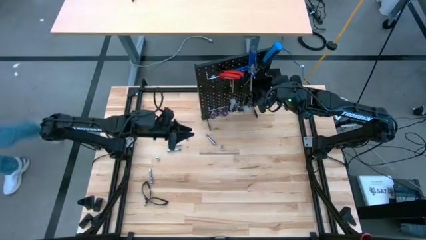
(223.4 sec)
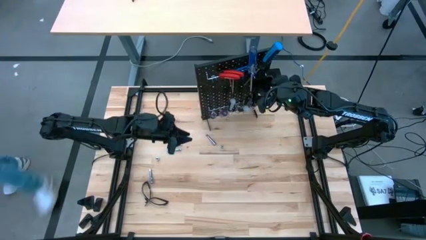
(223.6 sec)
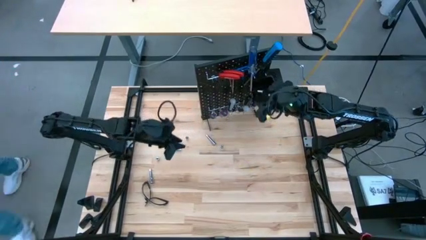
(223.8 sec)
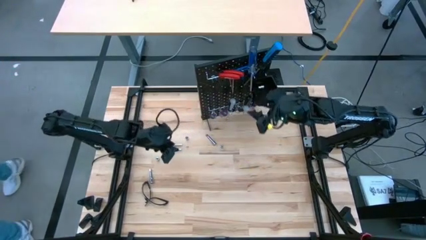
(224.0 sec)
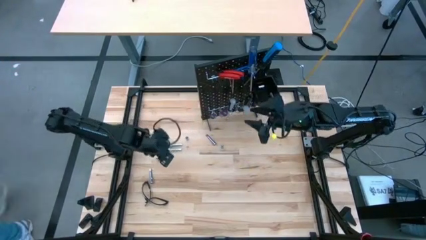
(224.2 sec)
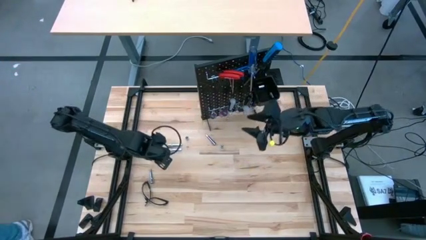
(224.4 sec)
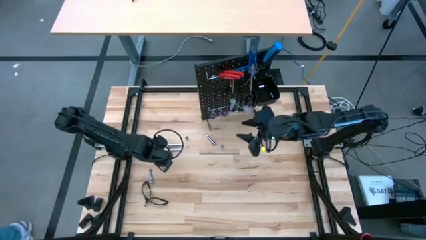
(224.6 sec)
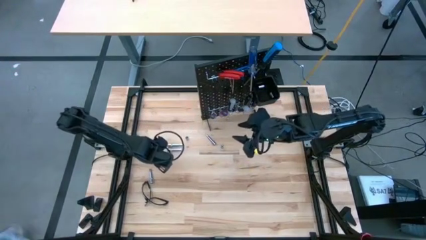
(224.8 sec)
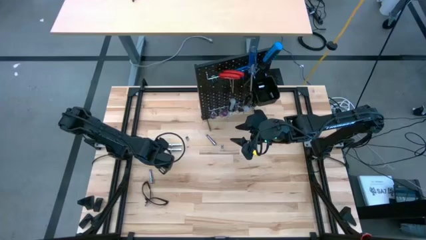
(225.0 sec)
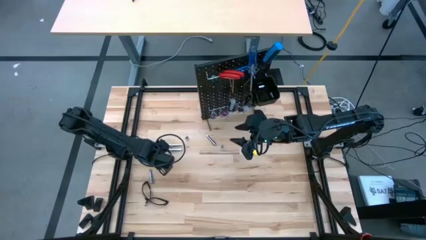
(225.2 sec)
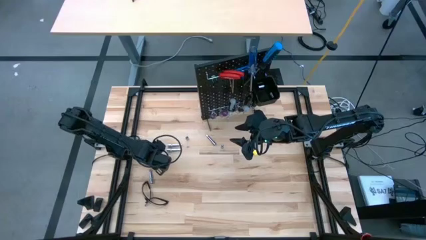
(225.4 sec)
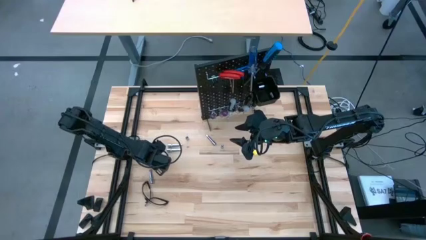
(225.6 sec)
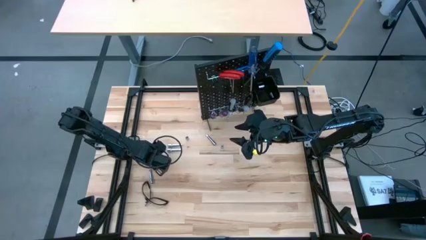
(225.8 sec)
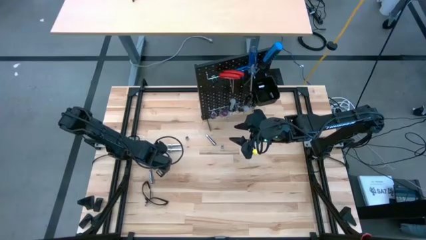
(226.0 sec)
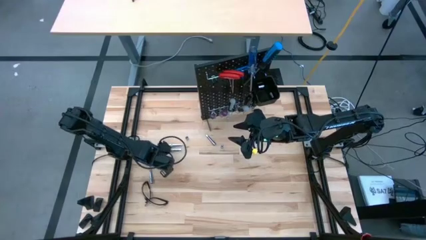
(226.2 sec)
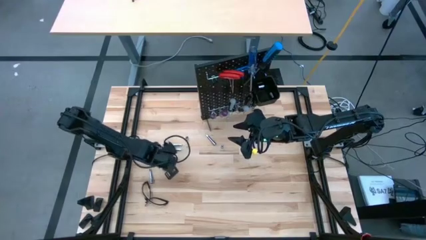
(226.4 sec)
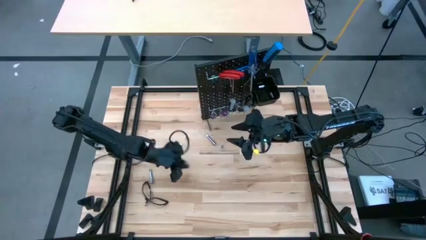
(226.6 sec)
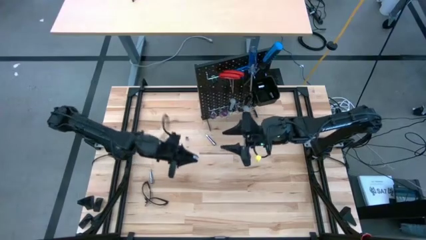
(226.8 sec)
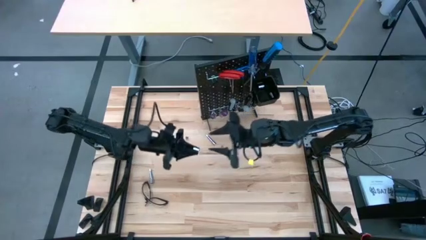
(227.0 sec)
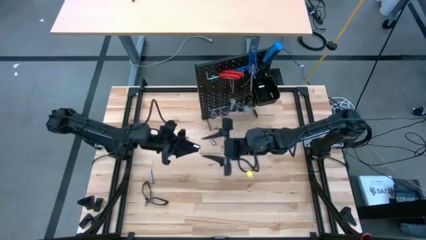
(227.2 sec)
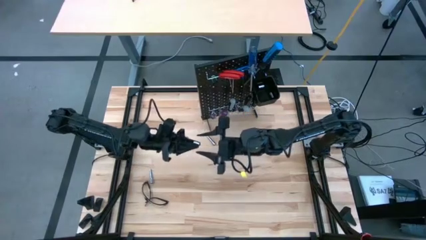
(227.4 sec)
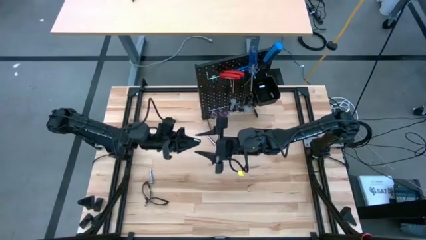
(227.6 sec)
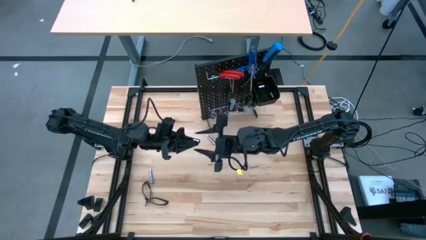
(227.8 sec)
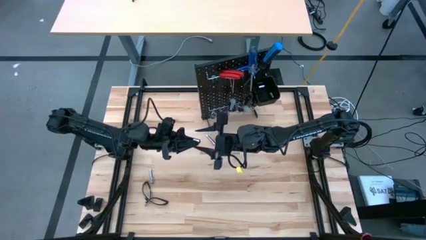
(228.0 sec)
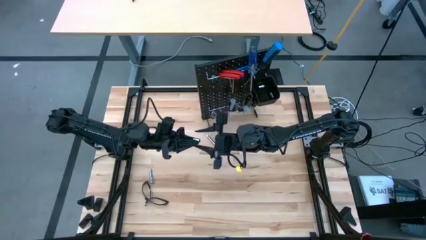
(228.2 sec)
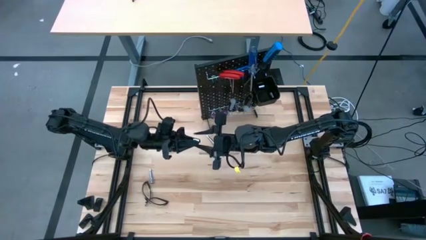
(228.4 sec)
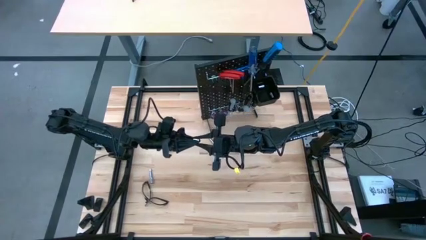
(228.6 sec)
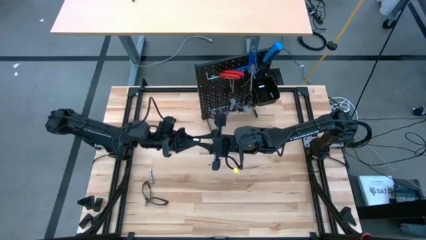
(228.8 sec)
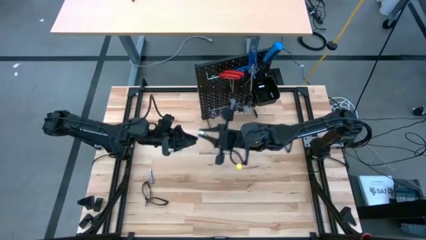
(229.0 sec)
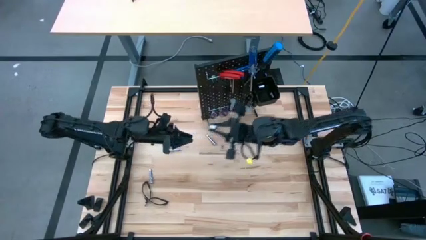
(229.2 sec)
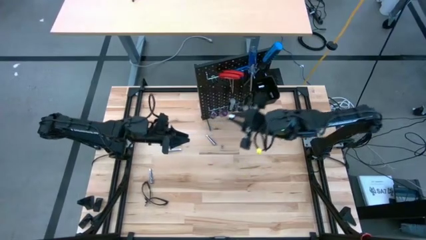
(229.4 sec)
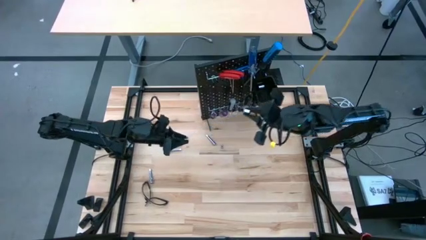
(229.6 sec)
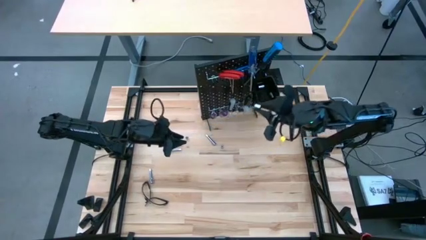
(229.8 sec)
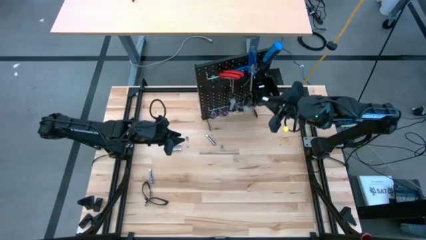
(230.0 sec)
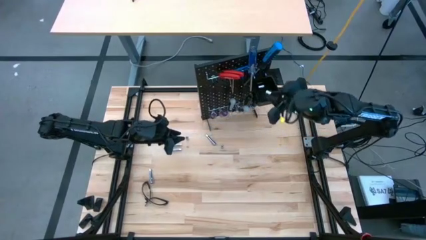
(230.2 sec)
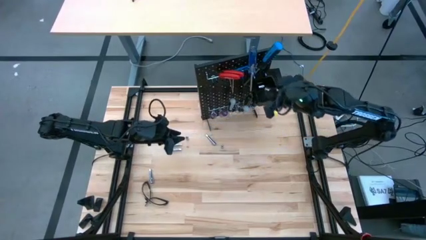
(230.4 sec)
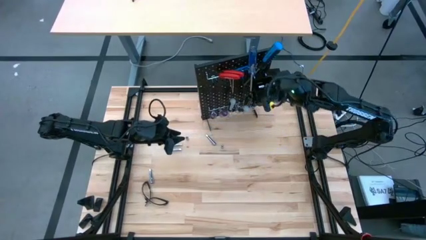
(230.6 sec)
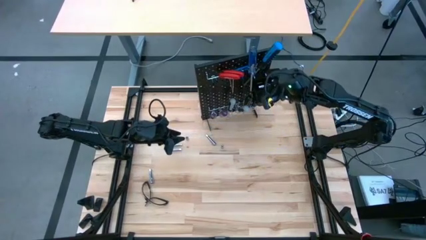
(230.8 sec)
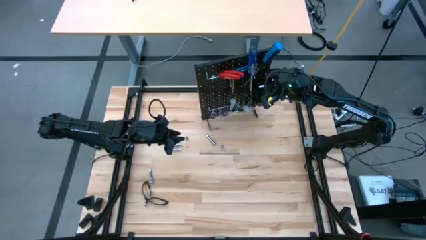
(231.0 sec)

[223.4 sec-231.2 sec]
Task: Hang tools onto peg board
Put the silver socket into the black bin on the pegboard

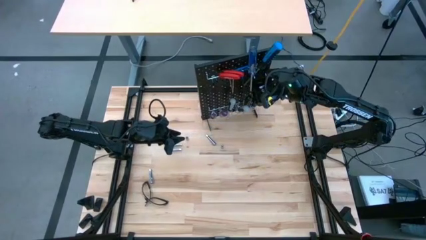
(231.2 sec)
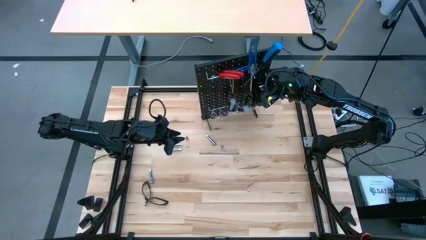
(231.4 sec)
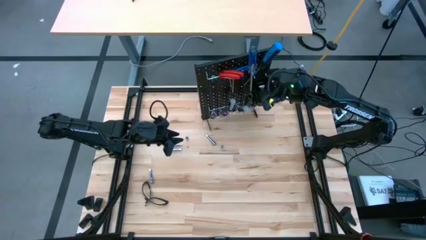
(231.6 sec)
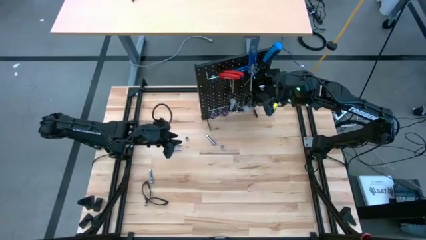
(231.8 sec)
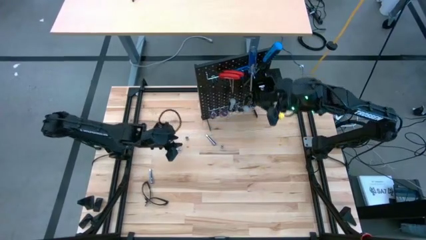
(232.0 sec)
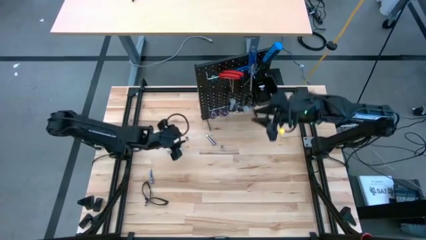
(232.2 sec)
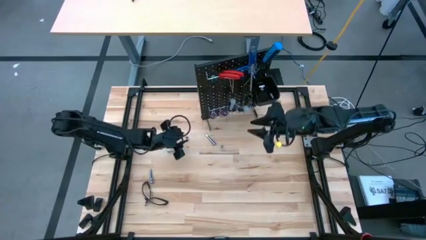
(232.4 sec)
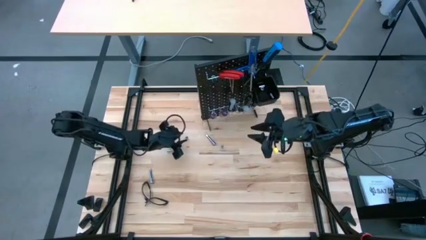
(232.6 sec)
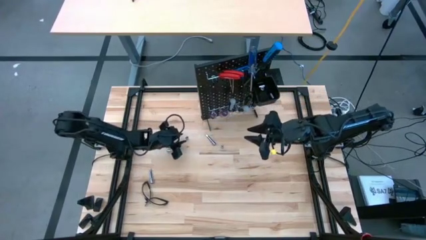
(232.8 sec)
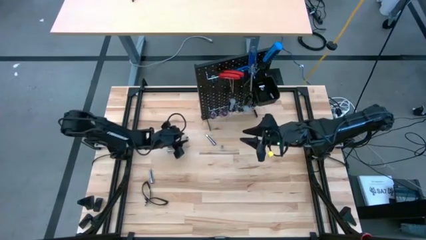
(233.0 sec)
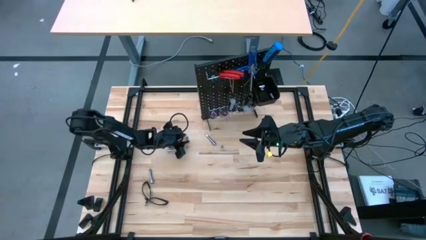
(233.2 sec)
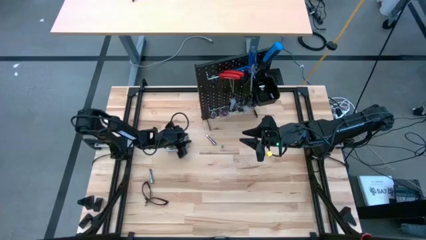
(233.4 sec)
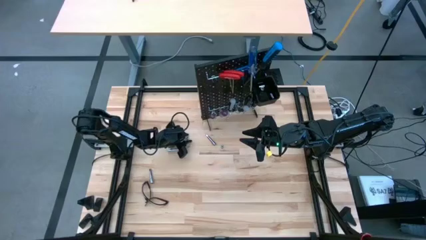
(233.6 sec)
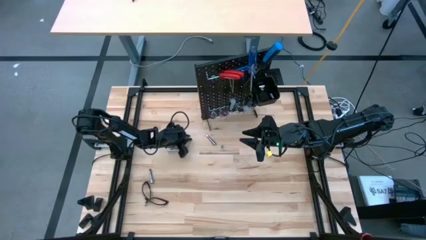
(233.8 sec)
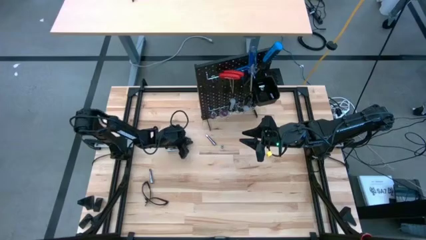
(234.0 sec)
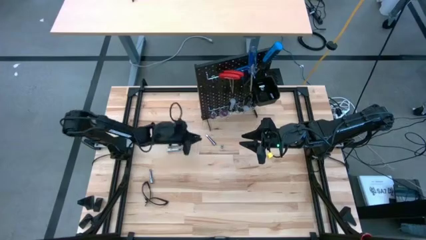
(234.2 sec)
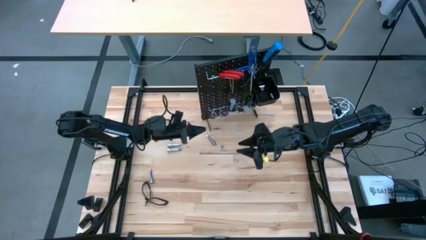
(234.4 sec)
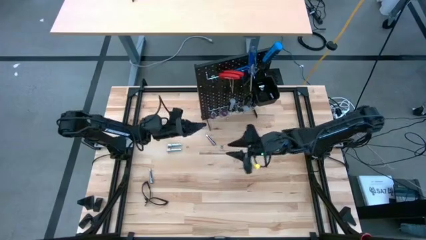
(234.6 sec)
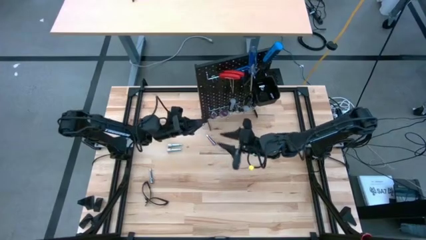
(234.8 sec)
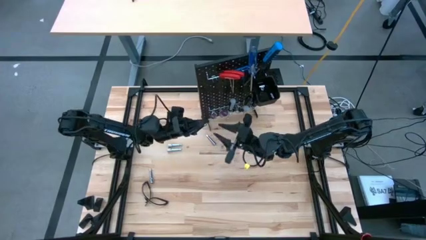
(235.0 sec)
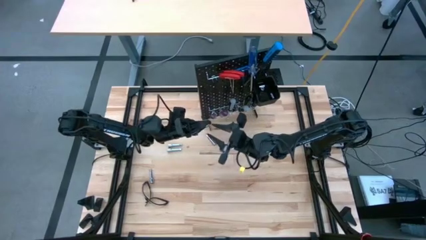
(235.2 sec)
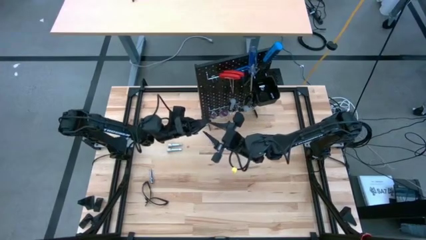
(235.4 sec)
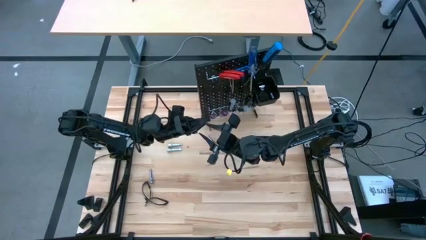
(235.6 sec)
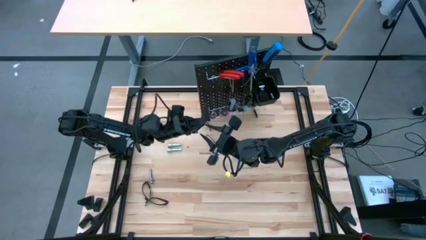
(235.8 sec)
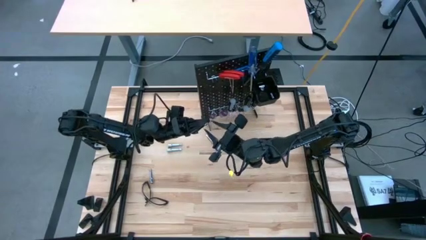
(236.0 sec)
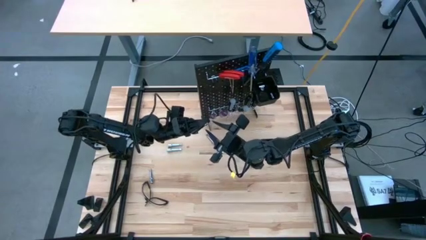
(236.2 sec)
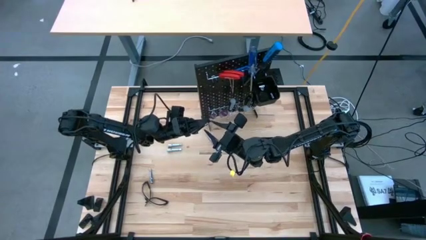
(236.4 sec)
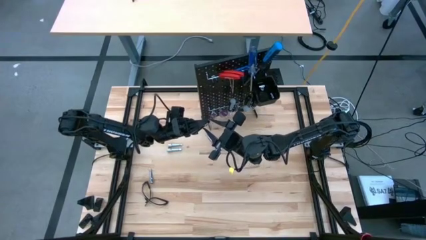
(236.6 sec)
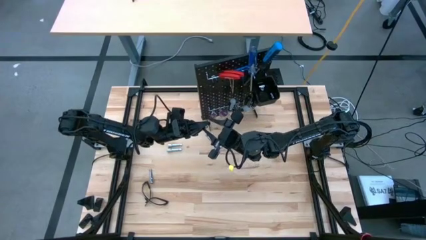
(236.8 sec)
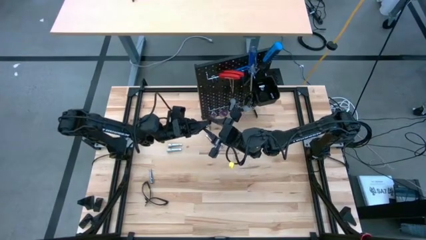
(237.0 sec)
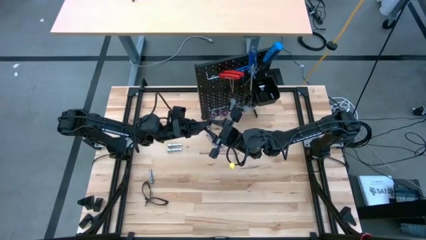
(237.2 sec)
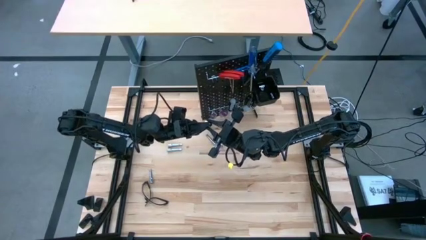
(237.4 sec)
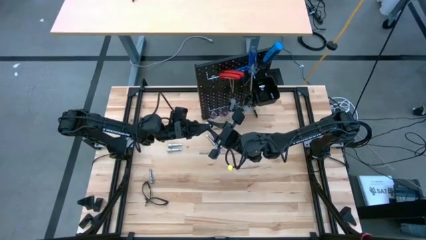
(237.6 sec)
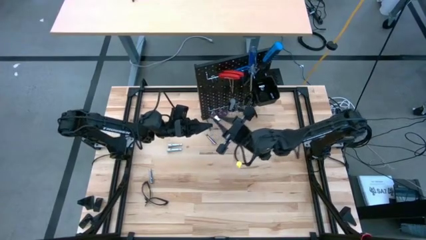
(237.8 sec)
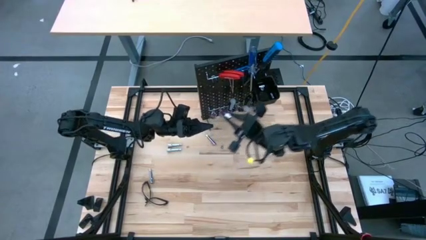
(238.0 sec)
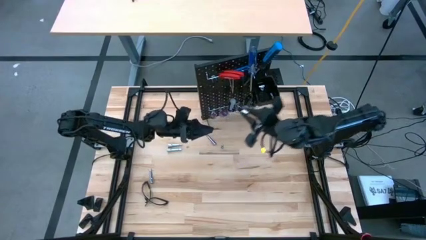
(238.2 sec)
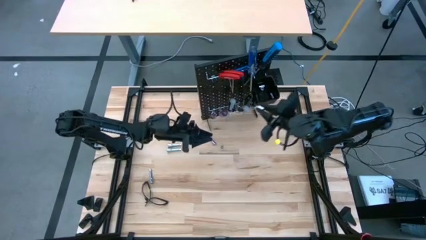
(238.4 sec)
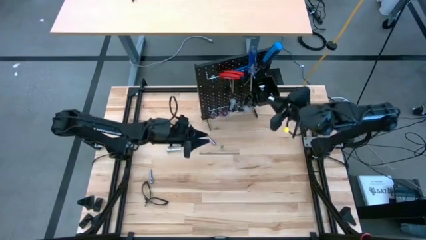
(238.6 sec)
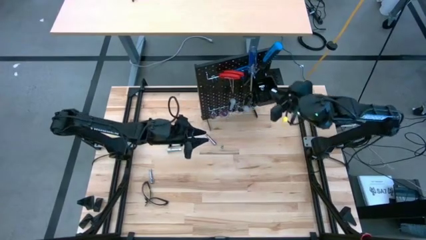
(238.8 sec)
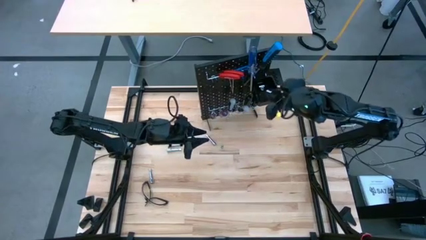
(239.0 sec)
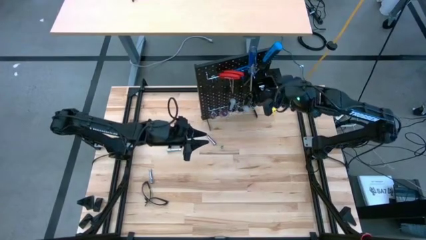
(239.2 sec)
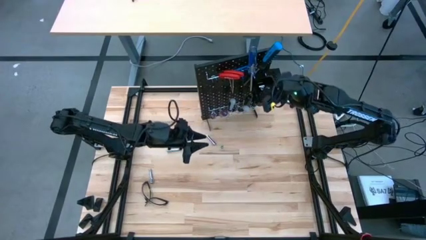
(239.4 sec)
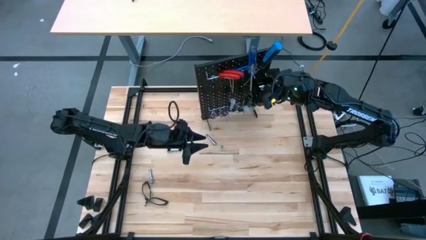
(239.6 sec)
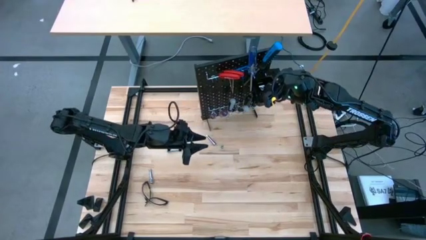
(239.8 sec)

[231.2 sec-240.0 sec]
Put the silver socket into the black bin on the pegboard
